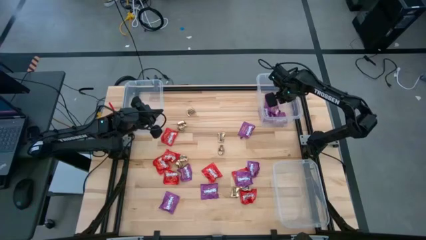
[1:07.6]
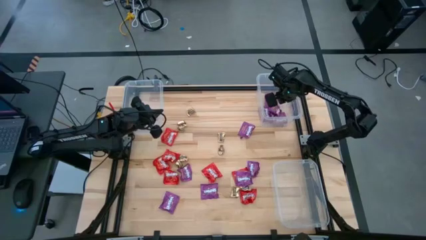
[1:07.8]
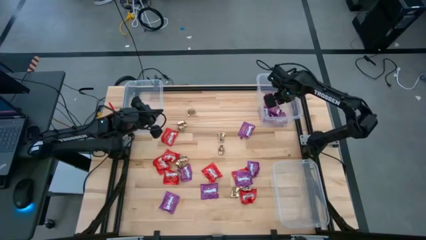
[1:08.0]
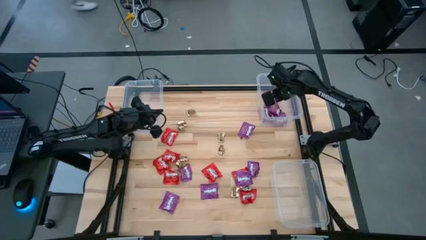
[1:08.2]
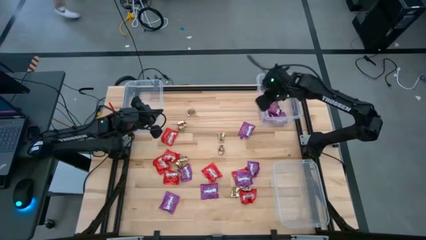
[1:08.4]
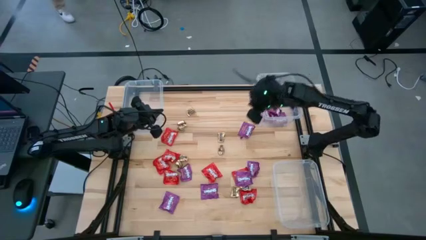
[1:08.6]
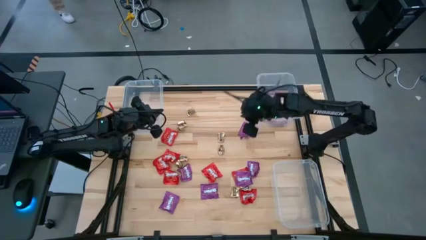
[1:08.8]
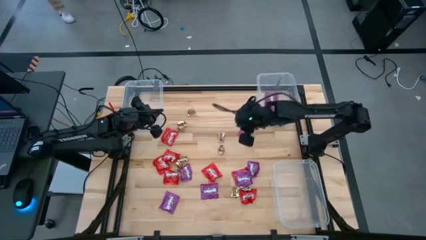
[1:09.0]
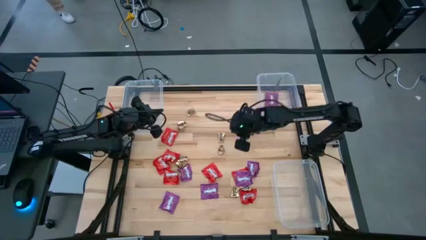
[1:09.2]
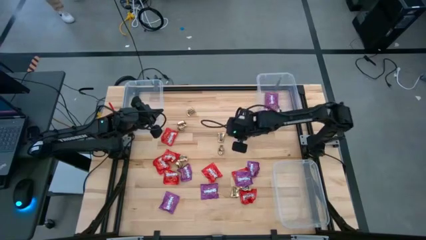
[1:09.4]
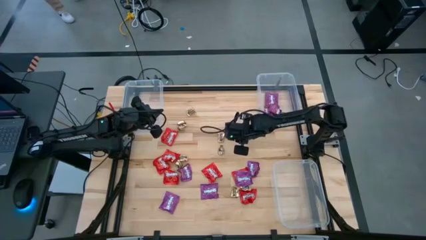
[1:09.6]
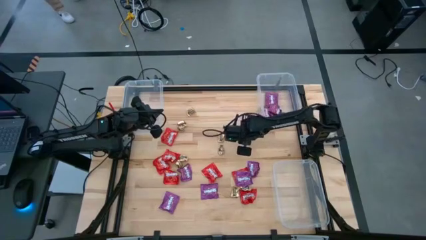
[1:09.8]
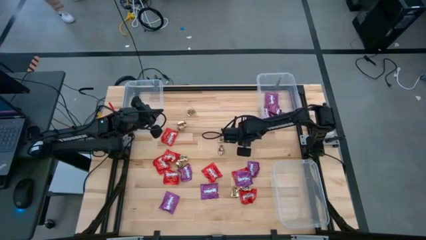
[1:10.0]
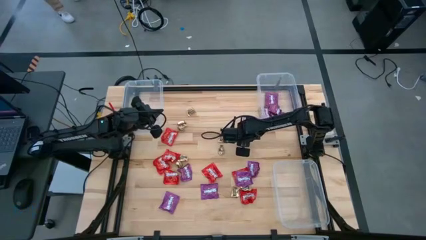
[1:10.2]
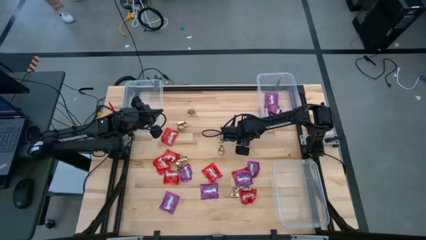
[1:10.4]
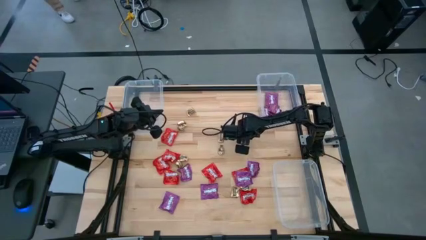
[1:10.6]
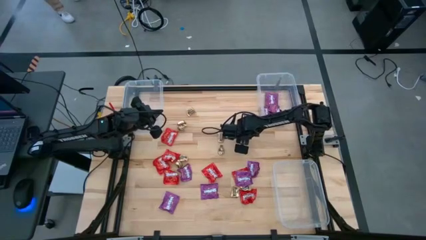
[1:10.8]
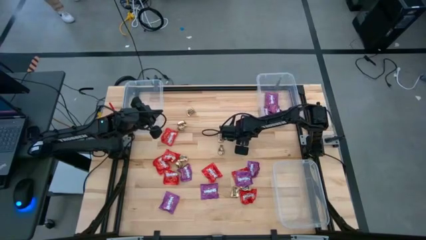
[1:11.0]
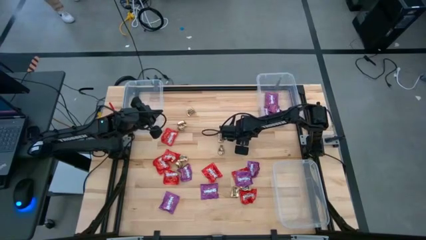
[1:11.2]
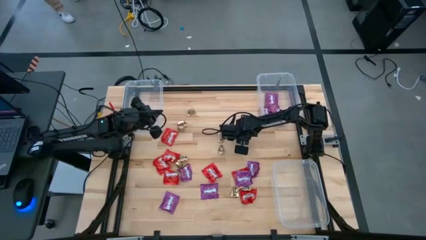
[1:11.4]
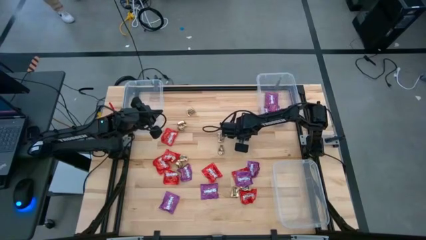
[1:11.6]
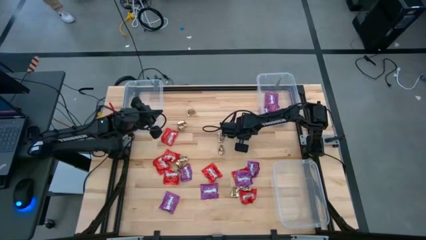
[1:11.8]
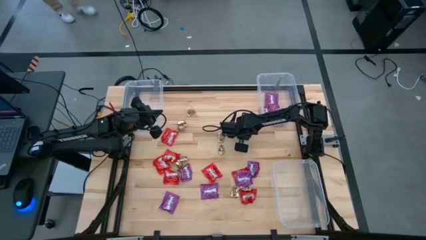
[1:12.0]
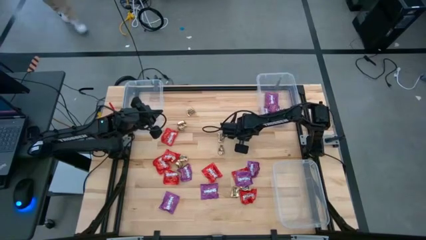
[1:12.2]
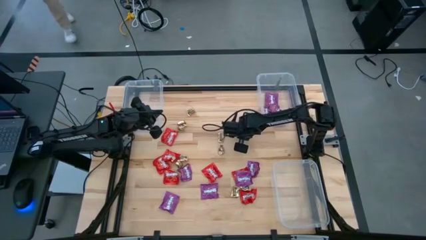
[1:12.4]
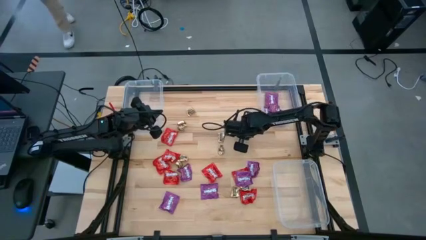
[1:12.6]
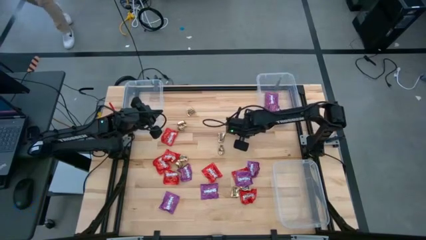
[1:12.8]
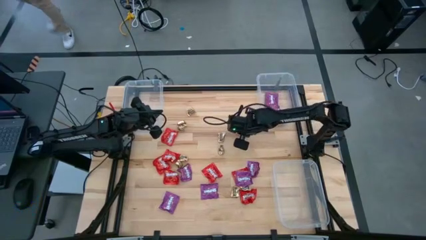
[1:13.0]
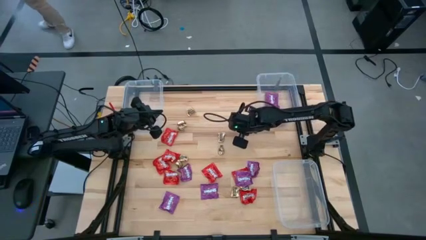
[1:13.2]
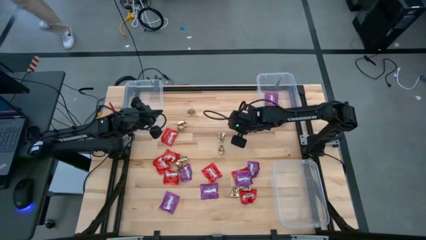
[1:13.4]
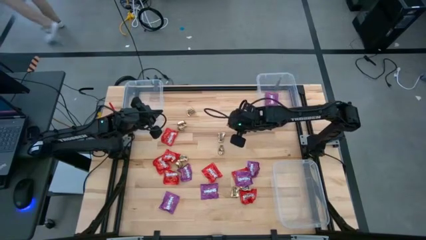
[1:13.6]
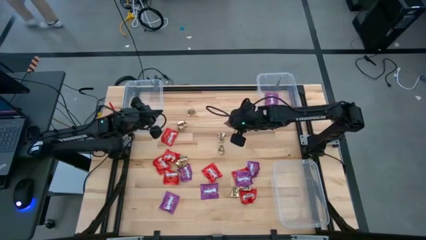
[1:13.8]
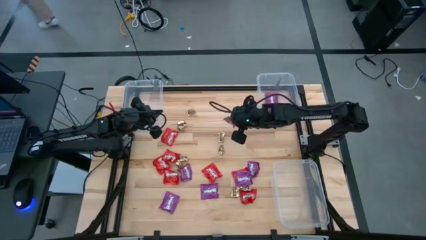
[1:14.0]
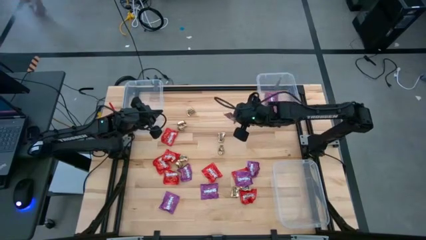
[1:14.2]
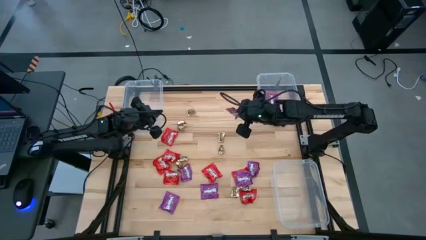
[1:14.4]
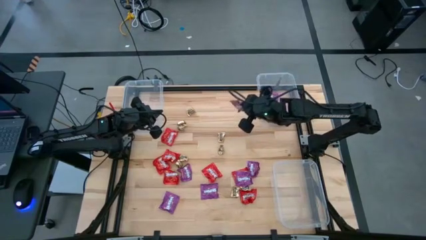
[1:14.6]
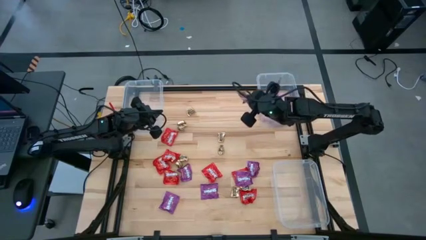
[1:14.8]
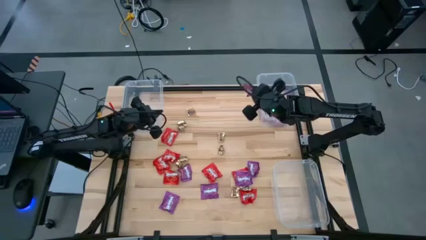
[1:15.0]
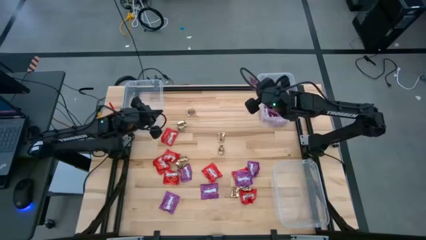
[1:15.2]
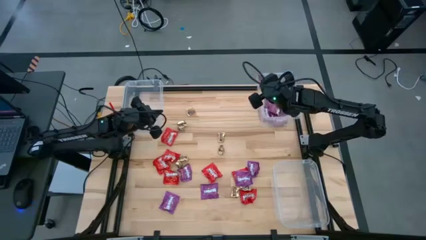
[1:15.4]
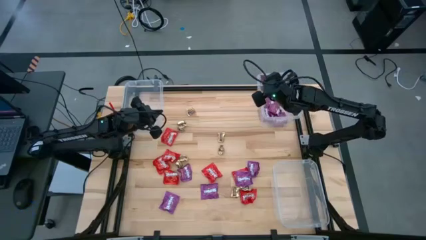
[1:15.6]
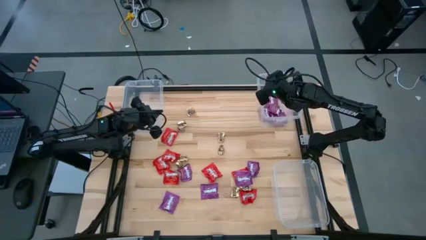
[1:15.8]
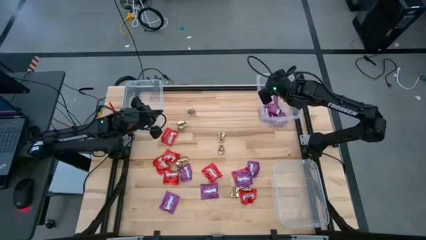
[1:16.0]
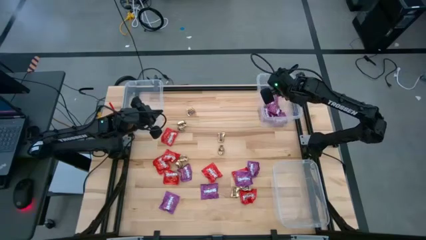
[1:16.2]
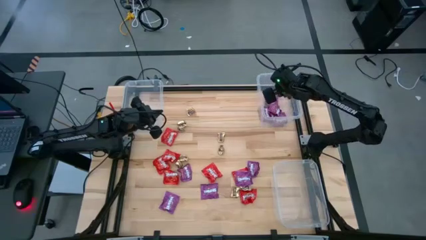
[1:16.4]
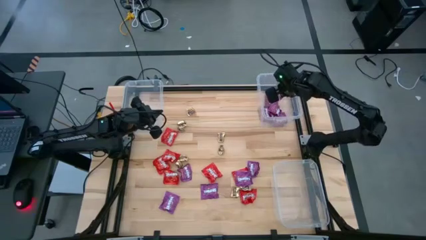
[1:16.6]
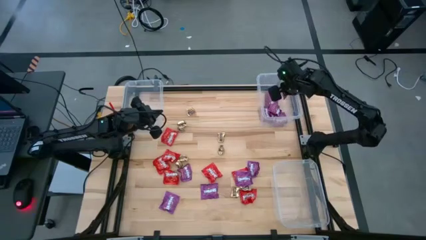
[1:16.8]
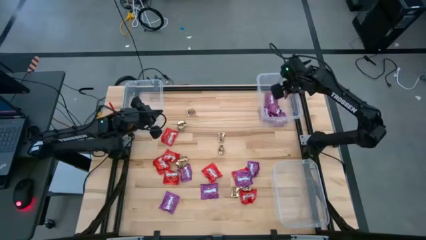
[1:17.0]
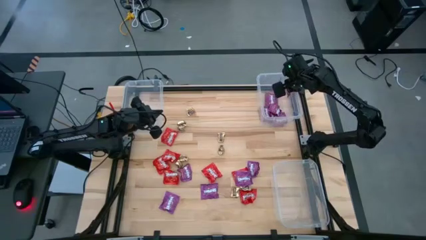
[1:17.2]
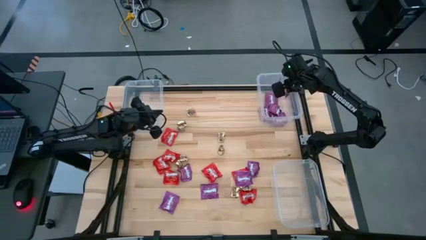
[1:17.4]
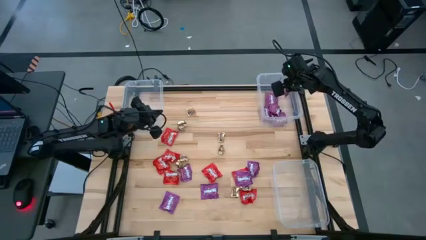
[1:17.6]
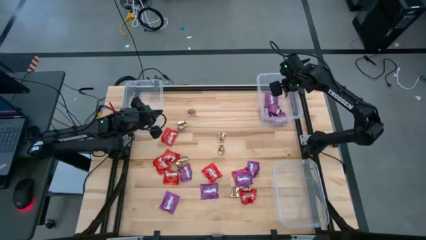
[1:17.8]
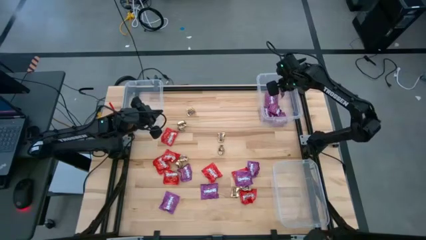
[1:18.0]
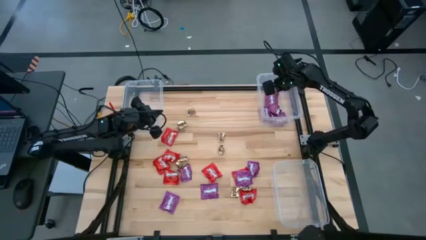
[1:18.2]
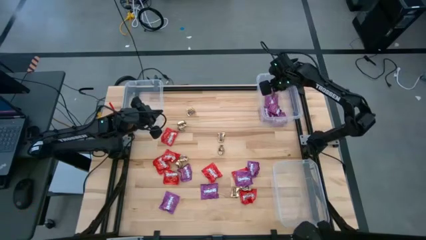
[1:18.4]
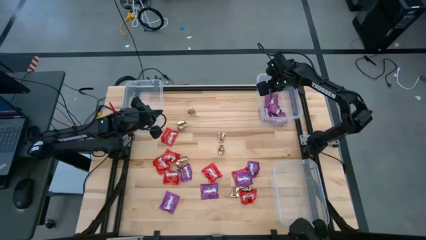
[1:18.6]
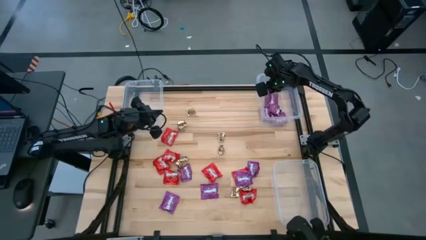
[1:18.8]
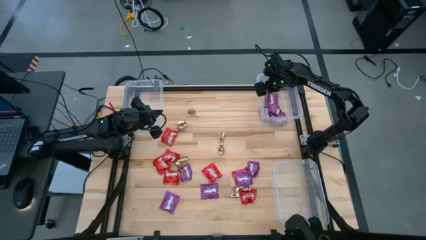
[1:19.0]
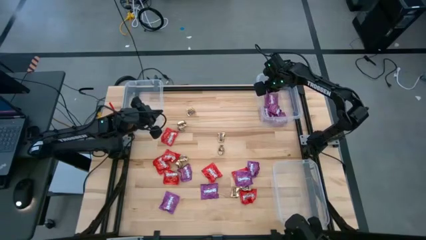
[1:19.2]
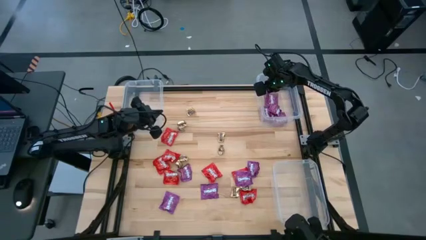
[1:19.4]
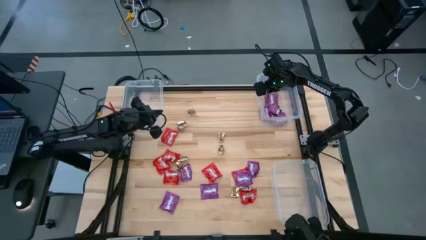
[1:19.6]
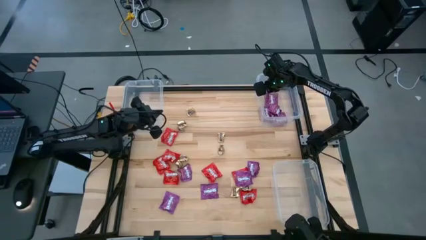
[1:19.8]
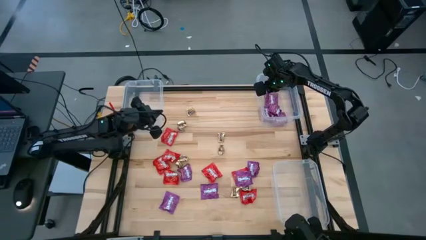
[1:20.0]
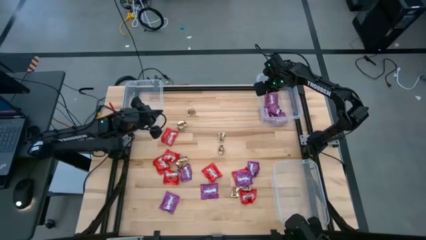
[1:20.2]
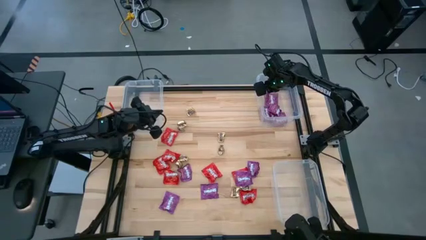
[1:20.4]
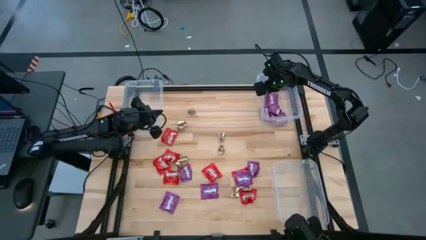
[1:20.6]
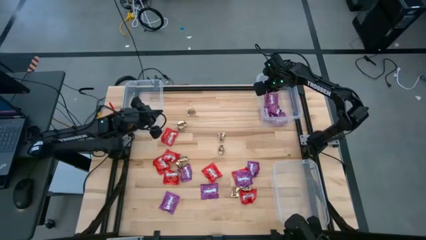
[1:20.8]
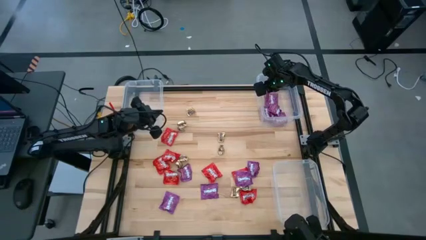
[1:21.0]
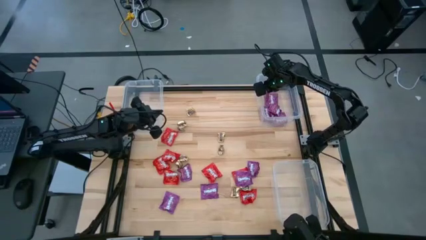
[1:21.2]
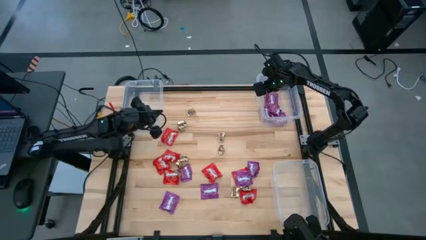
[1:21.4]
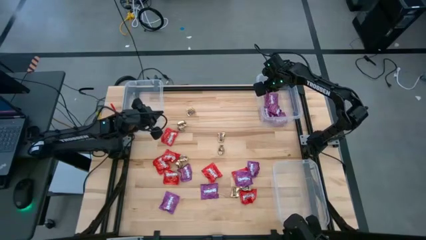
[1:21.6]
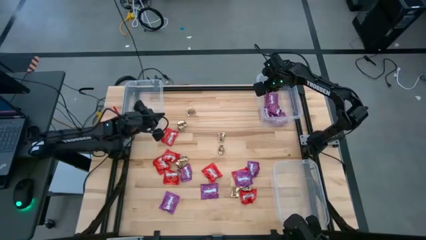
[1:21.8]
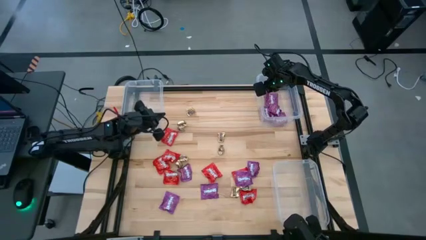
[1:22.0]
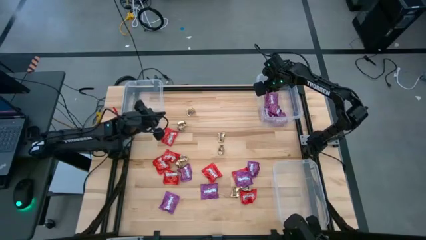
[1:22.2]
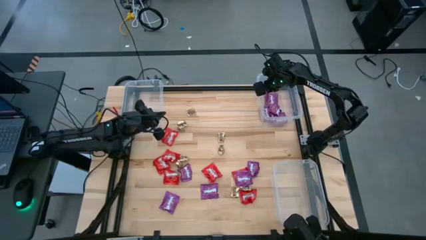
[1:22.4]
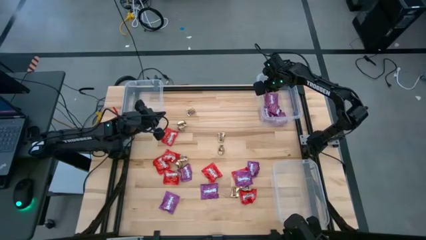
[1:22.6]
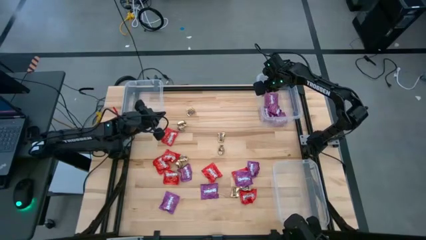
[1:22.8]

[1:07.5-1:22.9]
Task: Sort candy
Put the purple candy into the top right transparent bin

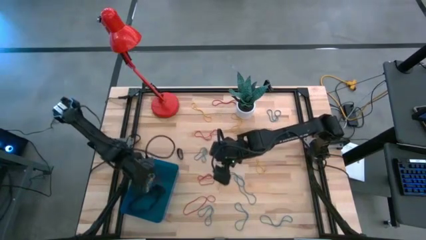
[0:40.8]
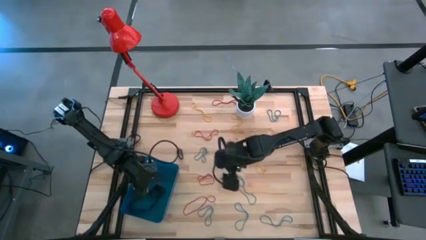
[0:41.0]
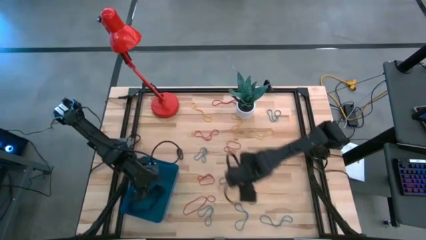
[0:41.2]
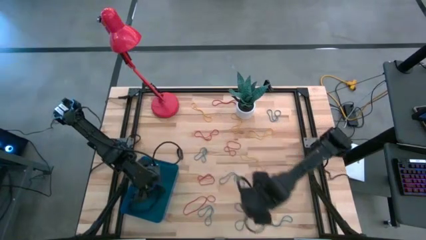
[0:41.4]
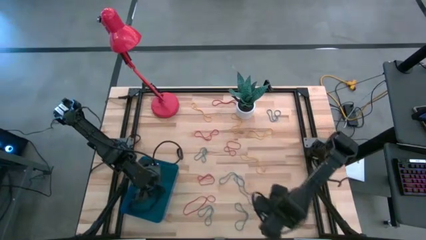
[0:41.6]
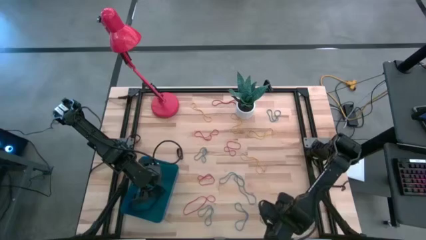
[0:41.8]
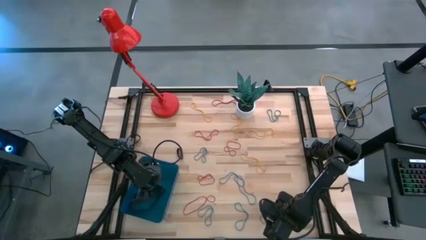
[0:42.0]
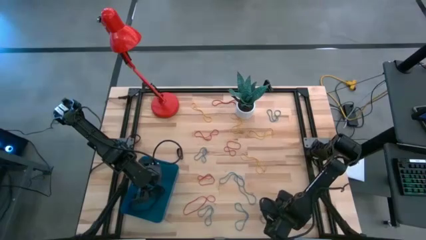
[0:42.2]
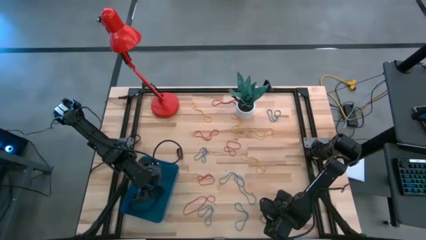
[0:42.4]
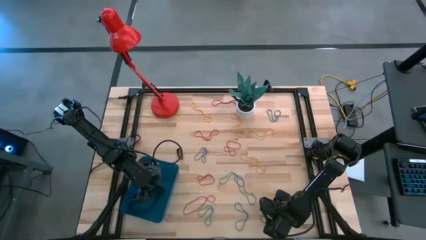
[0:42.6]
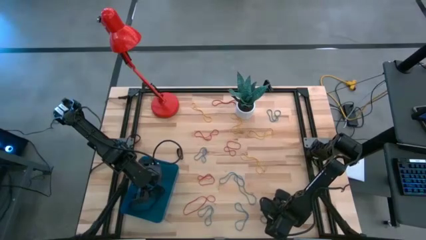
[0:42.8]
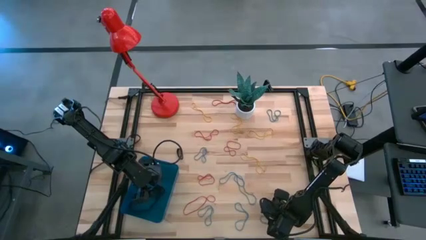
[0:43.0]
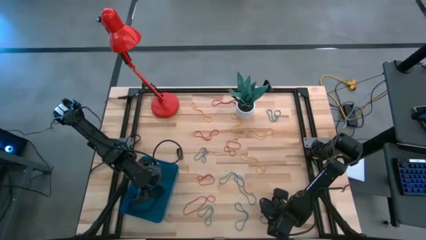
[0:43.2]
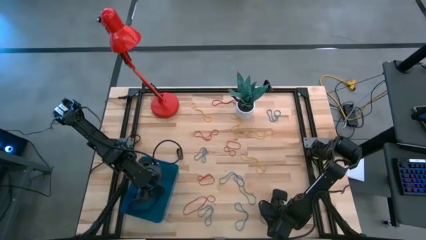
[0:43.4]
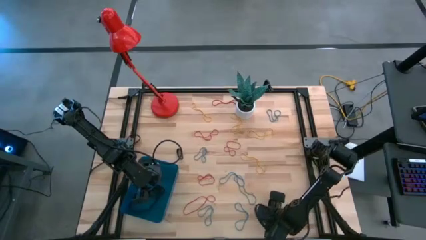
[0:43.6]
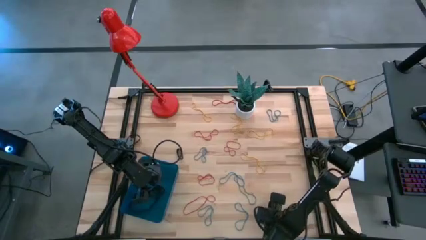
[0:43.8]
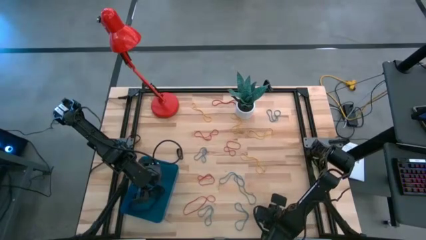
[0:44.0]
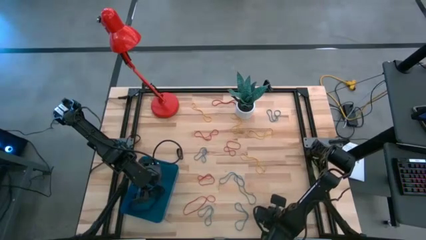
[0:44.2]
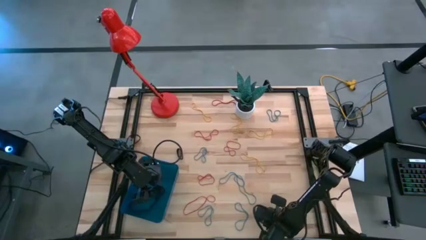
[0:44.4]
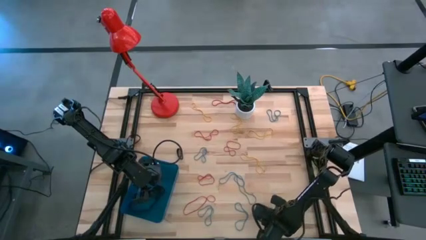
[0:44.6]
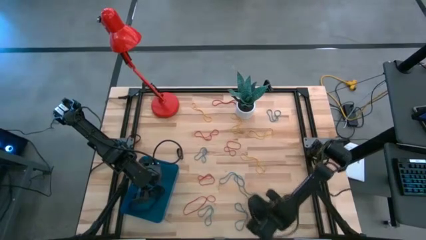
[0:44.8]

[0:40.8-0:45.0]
Task: Pick and place rubber bands into bin
Put the blue rubber band into the blue bin
